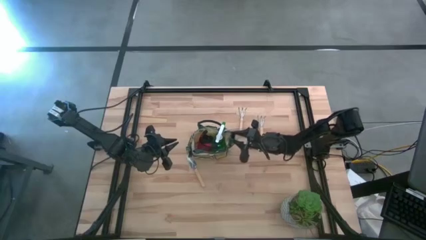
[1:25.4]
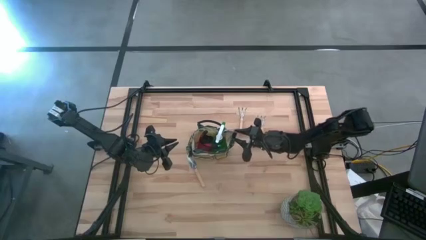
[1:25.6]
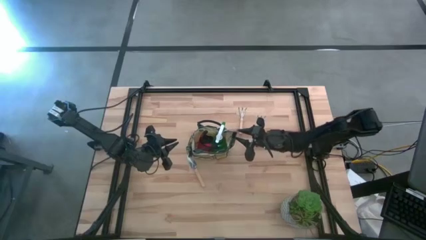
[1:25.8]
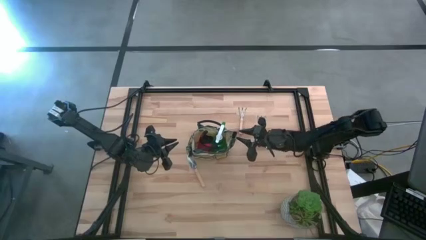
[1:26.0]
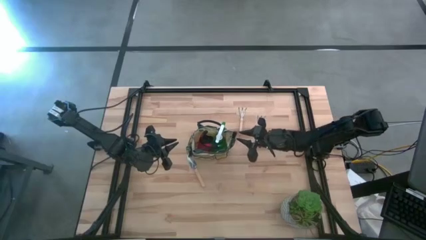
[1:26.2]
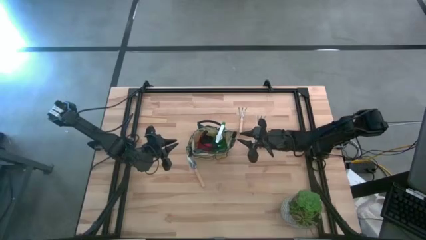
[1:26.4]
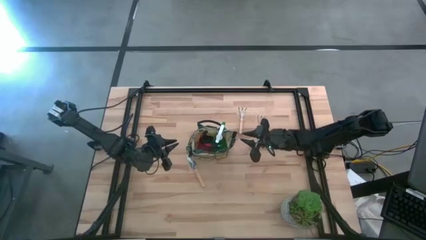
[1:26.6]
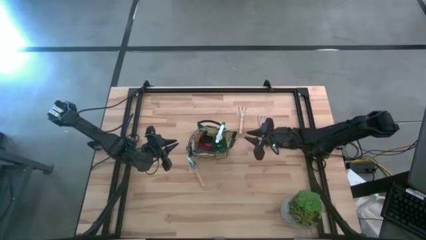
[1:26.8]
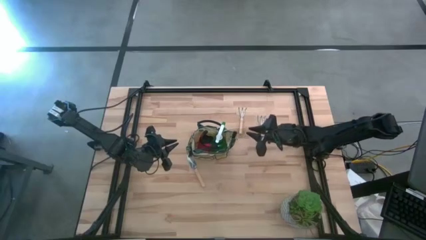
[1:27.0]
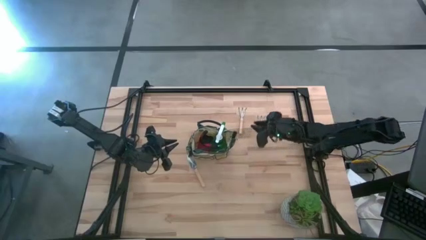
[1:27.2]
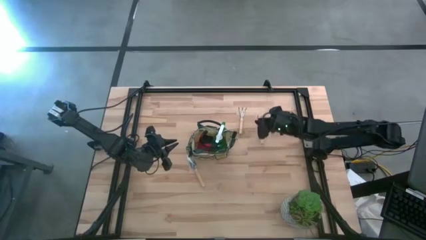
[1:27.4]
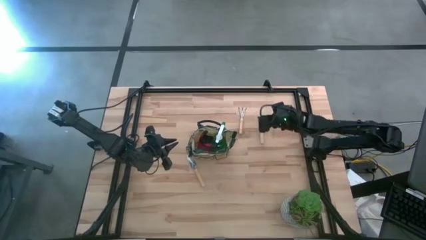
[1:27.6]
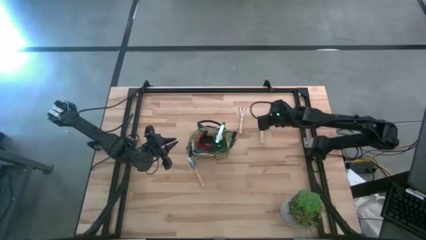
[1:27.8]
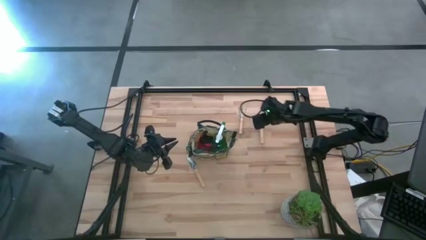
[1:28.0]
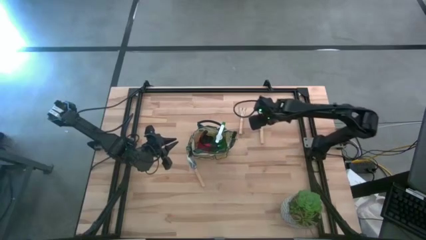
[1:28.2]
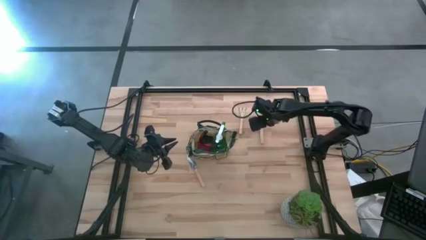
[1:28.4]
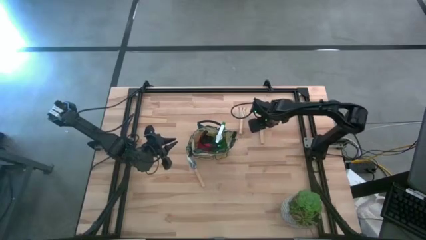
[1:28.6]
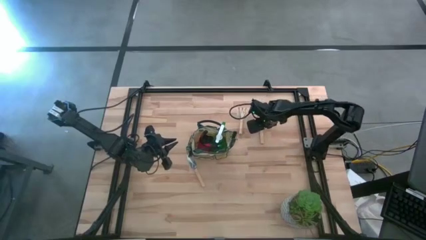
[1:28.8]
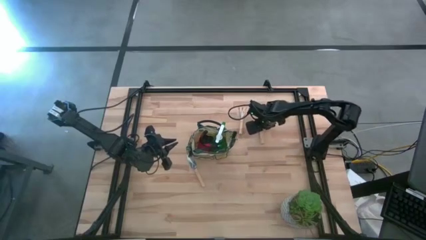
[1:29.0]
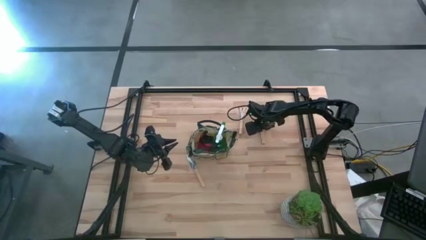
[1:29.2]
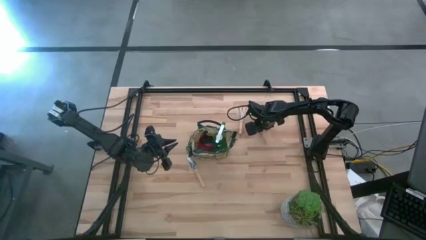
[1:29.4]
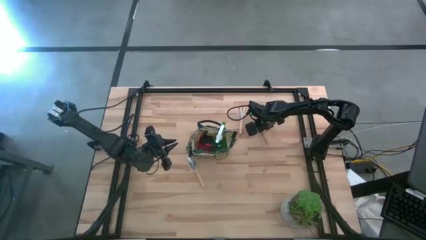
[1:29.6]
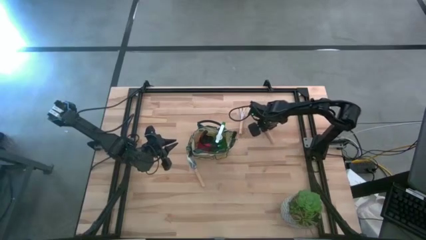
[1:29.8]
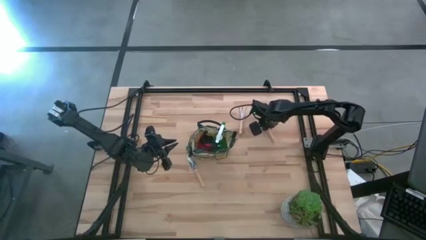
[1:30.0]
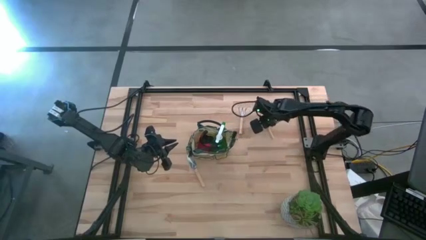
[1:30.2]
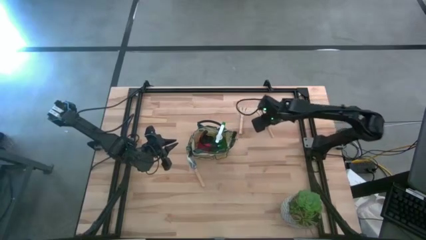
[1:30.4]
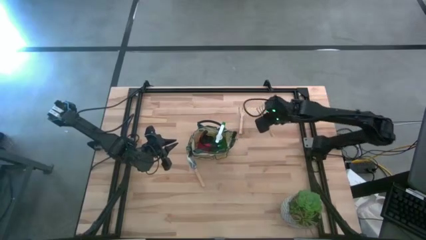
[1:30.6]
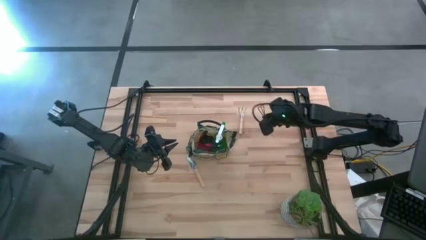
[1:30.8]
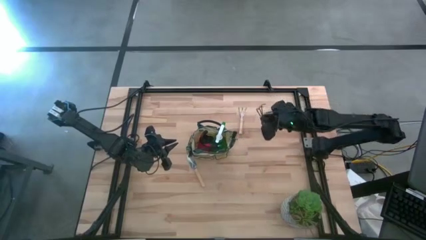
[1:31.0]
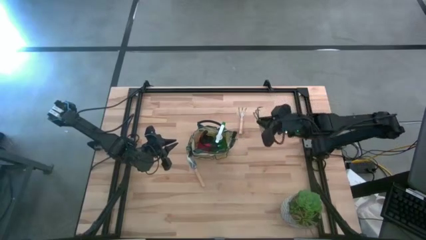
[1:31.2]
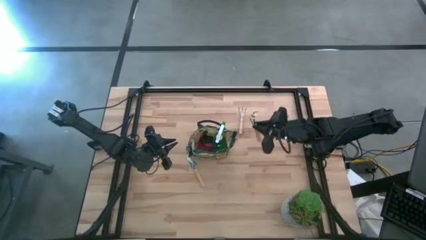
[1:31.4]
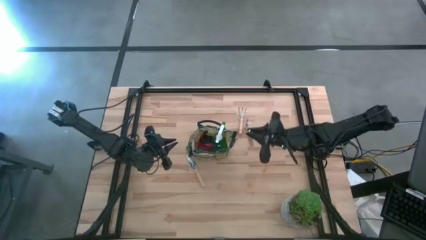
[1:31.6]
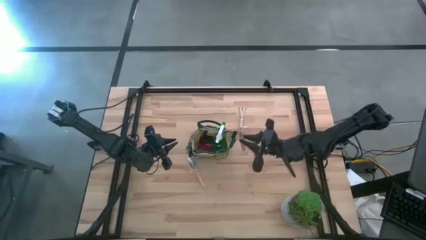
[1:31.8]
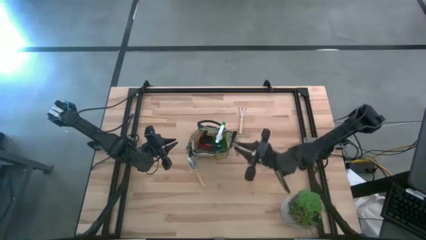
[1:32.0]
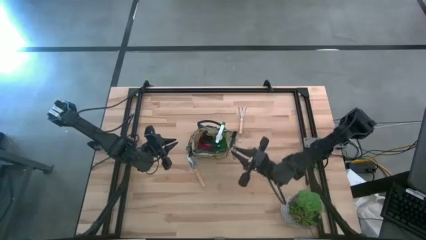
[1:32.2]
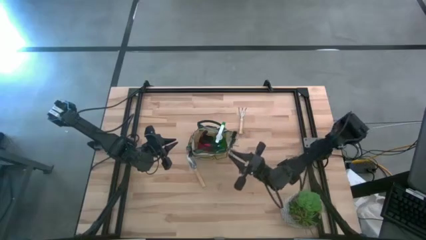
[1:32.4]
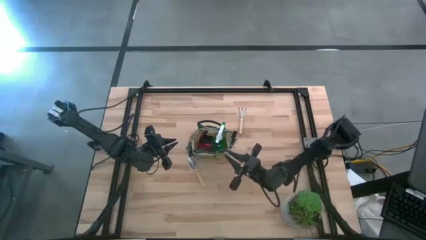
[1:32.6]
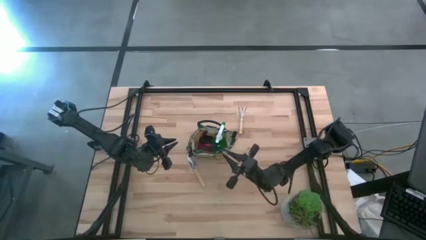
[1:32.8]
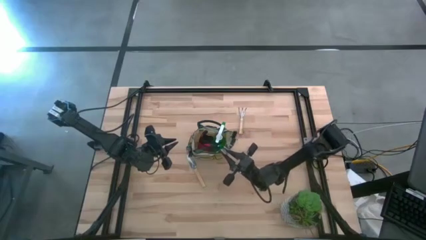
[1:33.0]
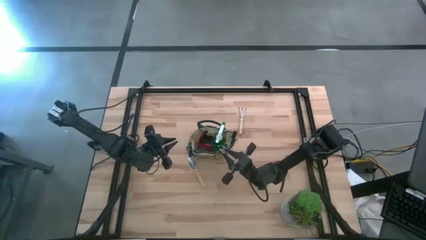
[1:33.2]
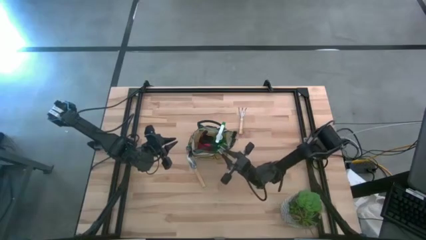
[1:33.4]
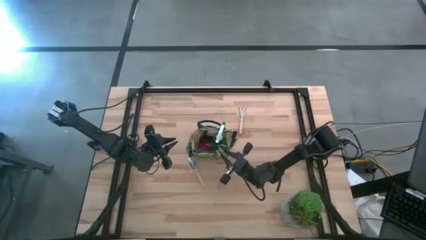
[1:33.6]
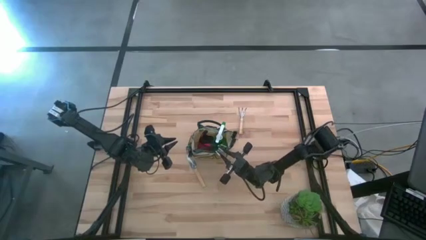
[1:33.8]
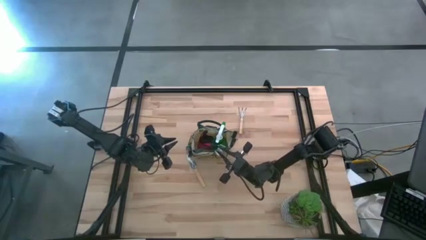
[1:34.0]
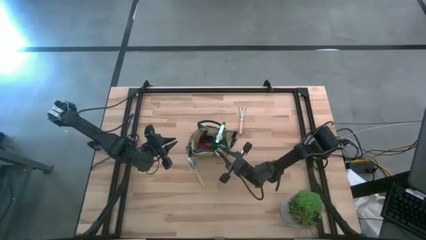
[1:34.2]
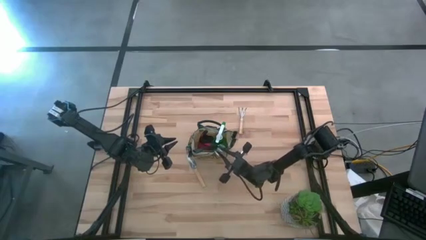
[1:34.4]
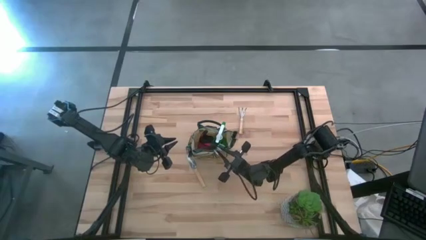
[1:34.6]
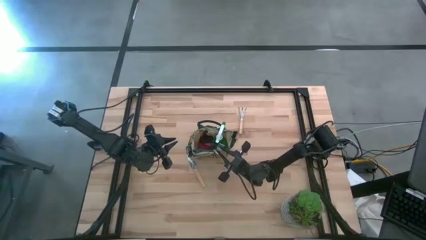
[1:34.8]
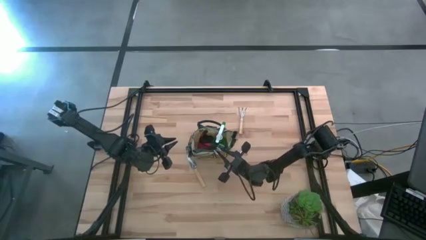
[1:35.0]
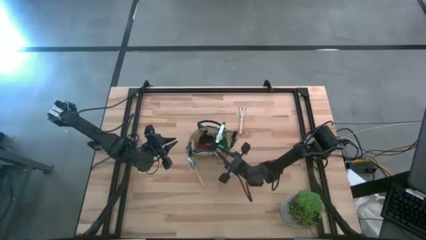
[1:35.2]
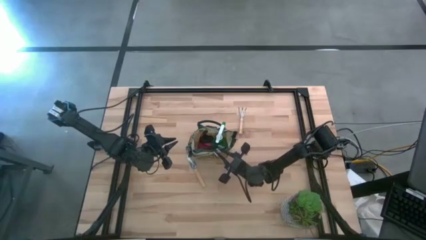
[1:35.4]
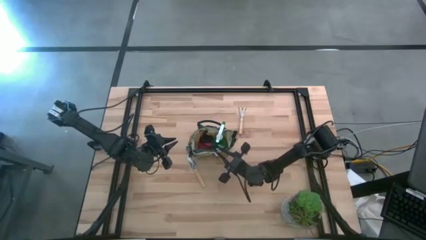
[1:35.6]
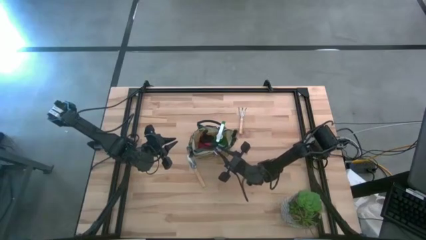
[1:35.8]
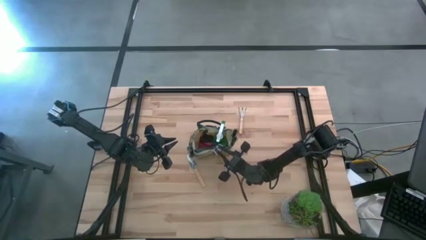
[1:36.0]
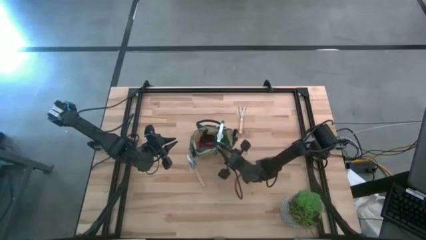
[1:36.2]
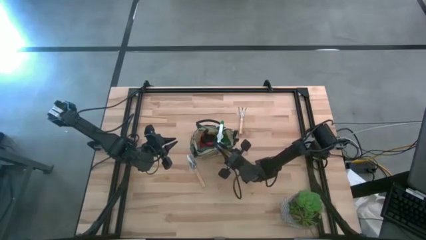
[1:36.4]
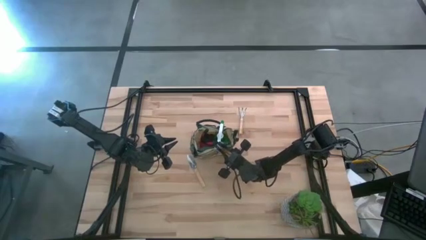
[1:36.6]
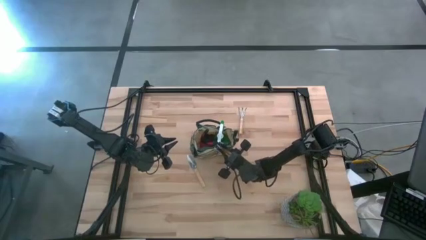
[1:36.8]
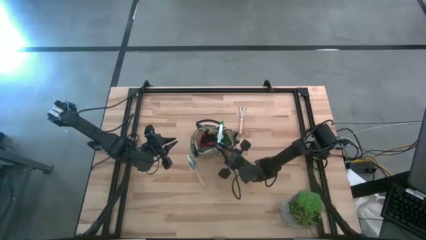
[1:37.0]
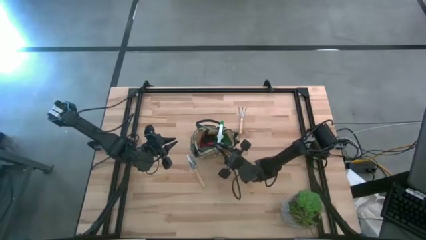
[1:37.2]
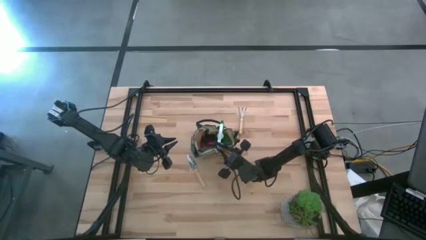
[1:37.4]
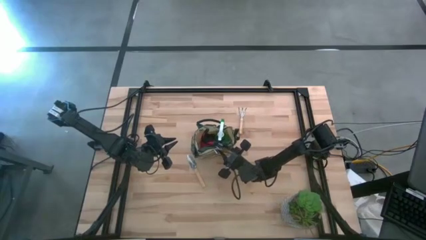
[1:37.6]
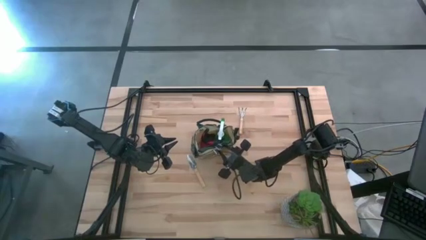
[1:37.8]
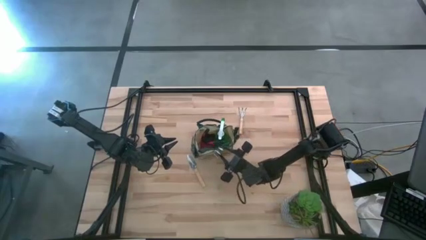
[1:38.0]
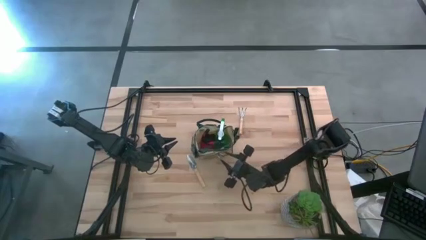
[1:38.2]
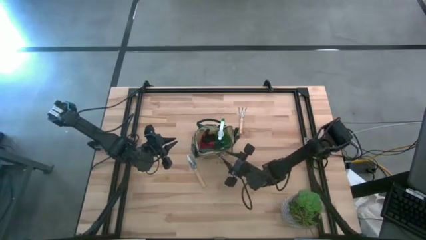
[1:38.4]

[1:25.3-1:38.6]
Task: Pick & Place Garden tools in Gardening bag
Put the right light brown hand rake into the white gardening bag

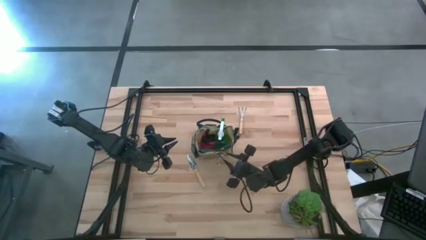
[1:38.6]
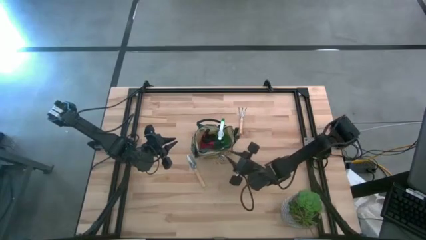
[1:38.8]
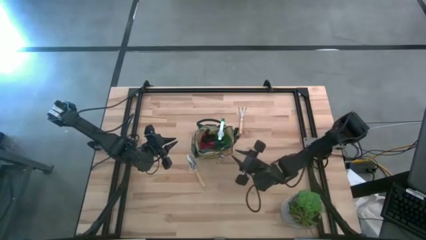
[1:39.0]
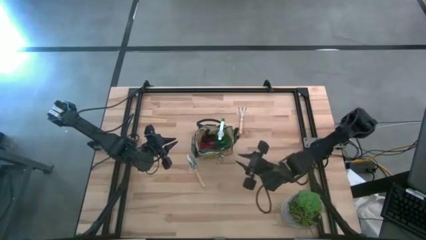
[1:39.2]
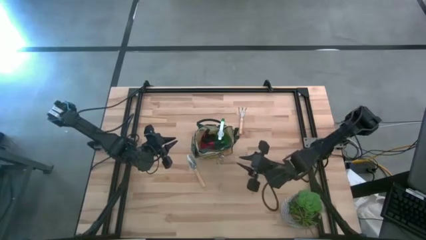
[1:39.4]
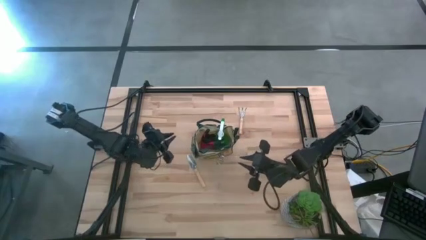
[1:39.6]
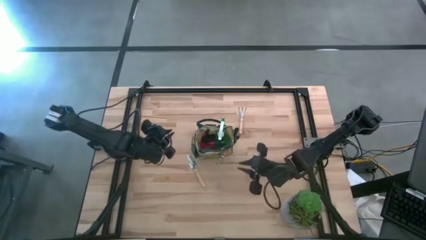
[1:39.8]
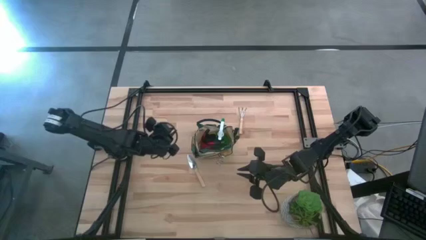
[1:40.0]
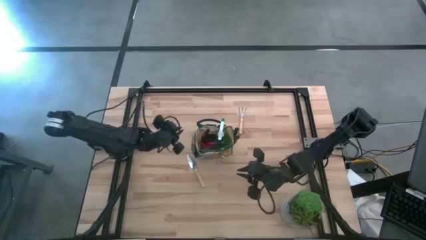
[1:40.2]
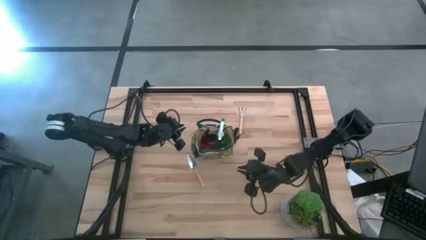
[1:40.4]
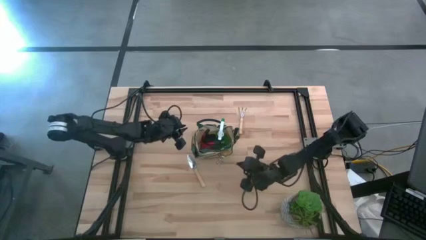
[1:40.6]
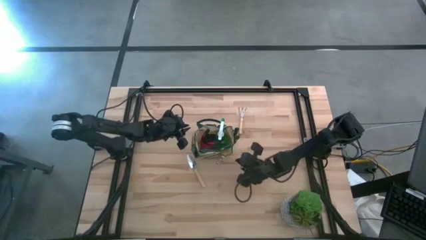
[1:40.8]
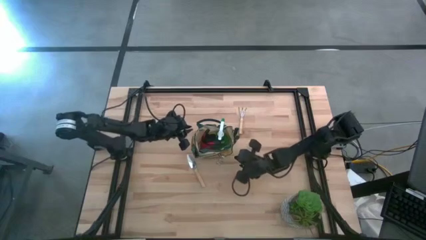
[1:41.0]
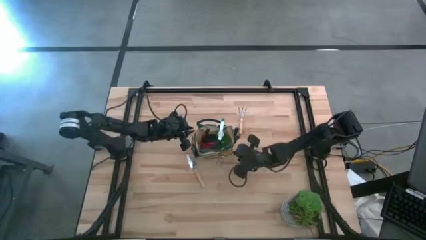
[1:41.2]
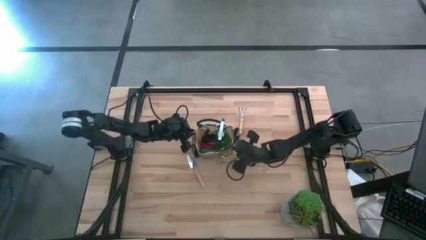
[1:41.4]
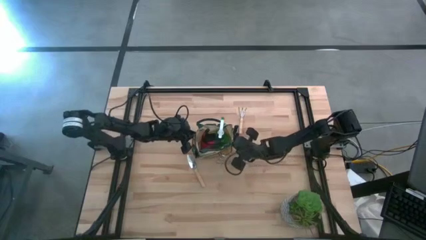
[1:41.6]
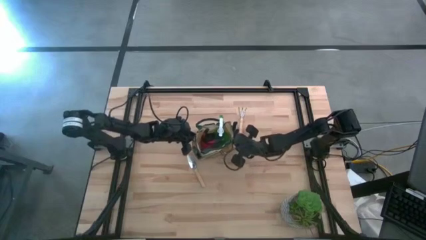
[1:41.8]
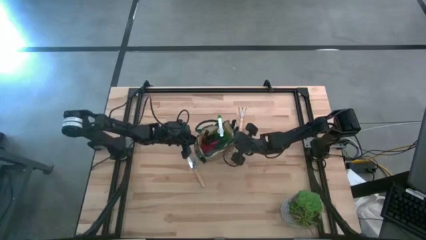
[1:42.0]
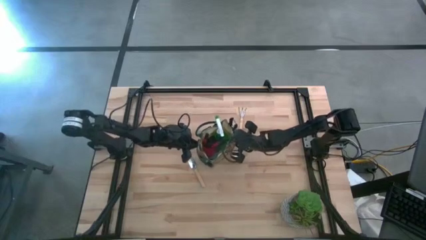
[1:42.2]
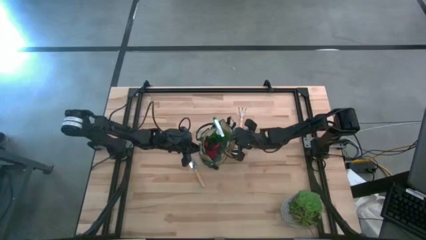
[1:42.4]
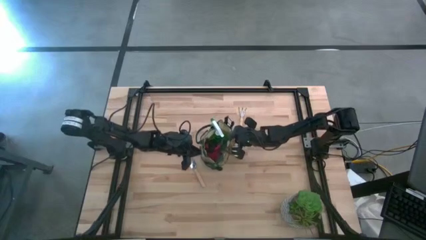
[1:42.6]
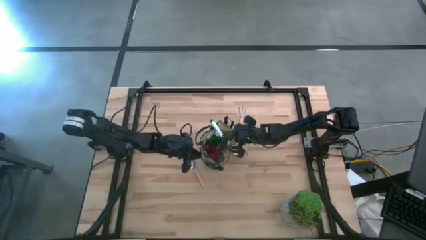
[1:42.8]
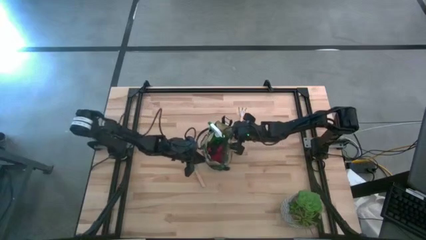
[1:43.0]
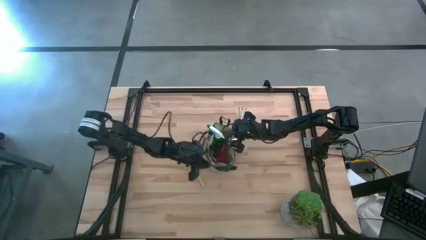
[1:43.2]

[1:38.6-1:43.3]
Adjust the white gardening bag
